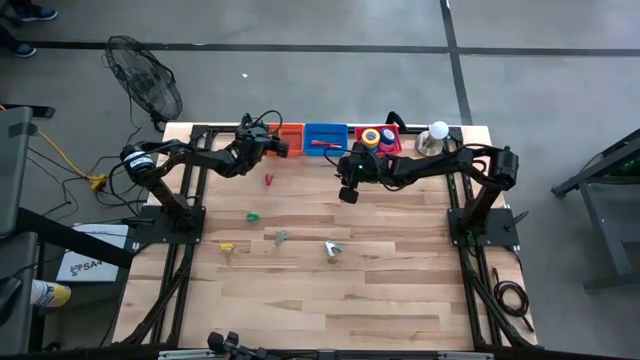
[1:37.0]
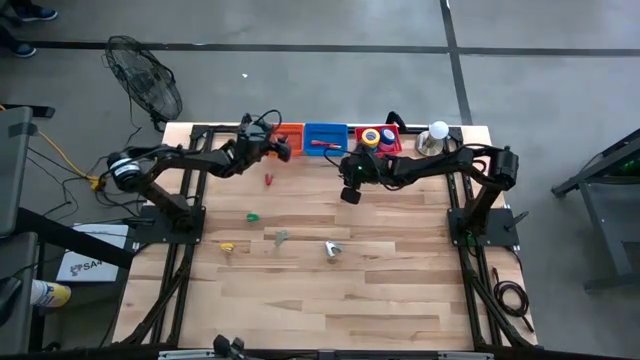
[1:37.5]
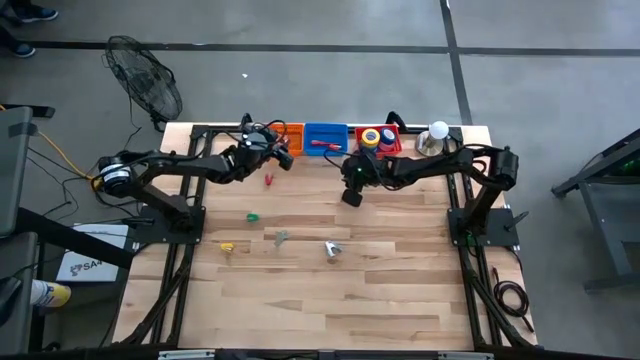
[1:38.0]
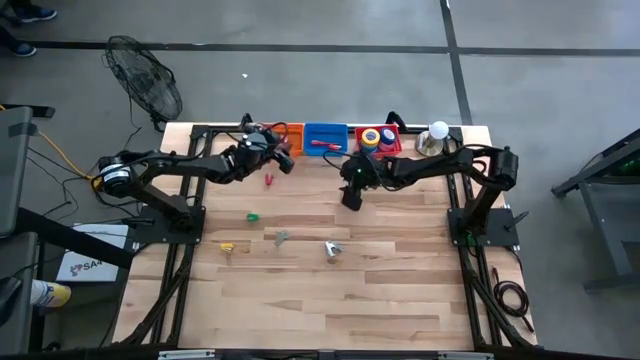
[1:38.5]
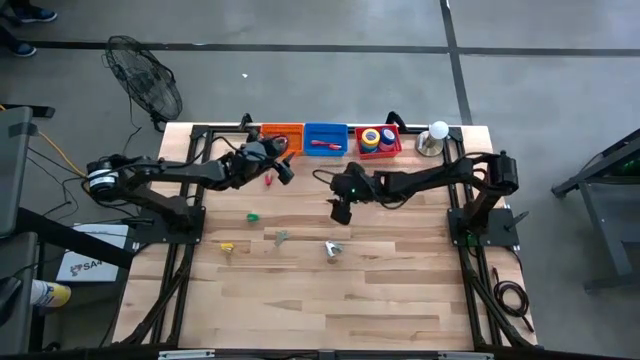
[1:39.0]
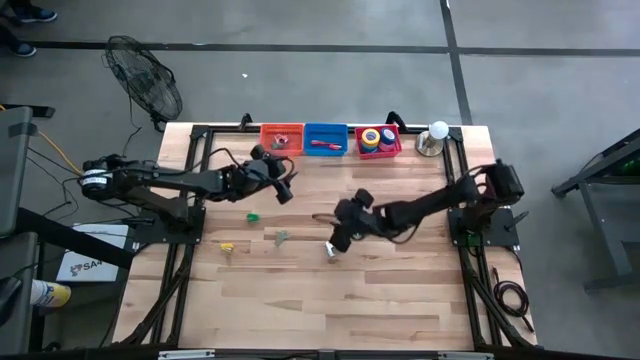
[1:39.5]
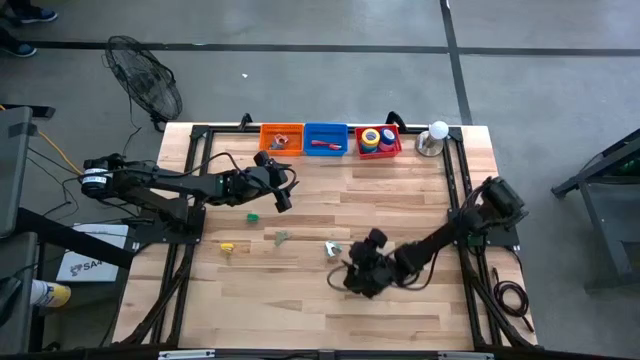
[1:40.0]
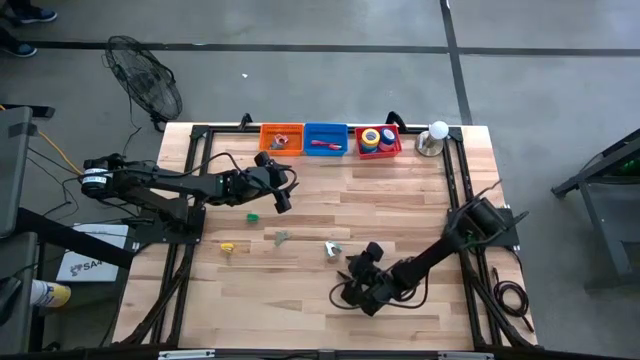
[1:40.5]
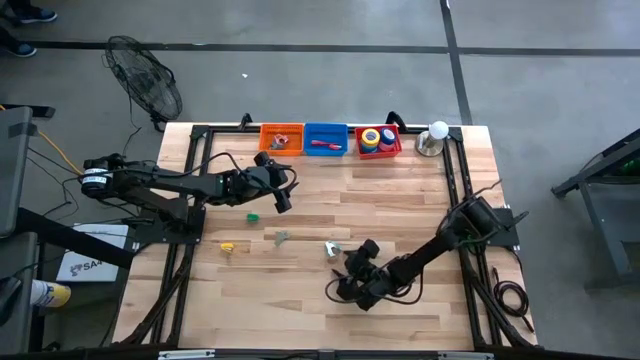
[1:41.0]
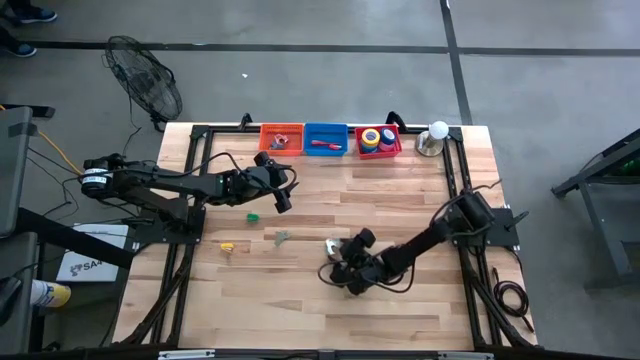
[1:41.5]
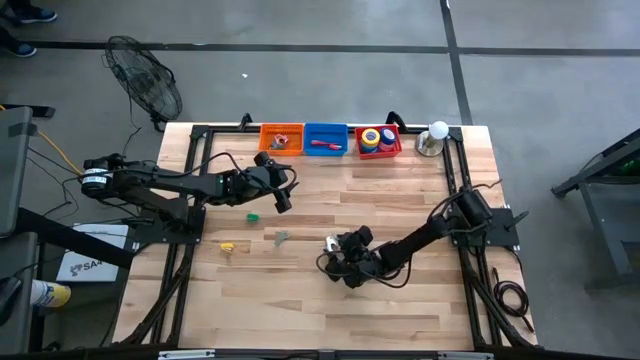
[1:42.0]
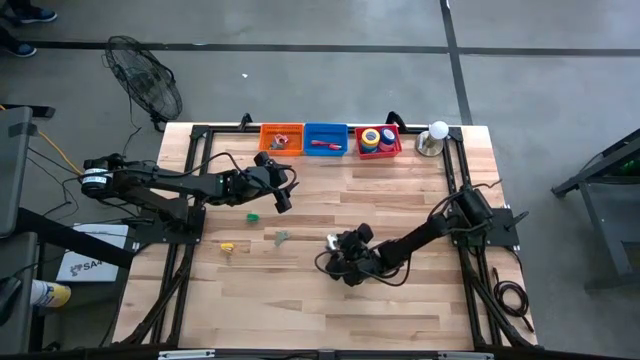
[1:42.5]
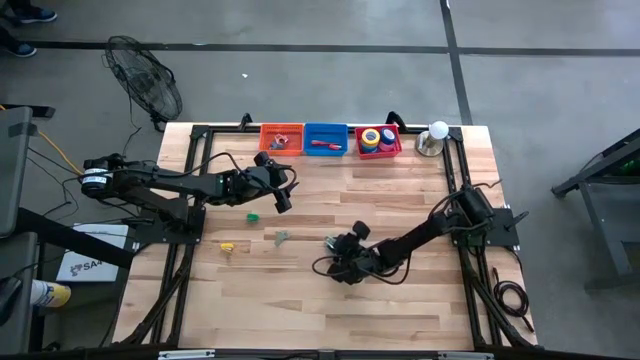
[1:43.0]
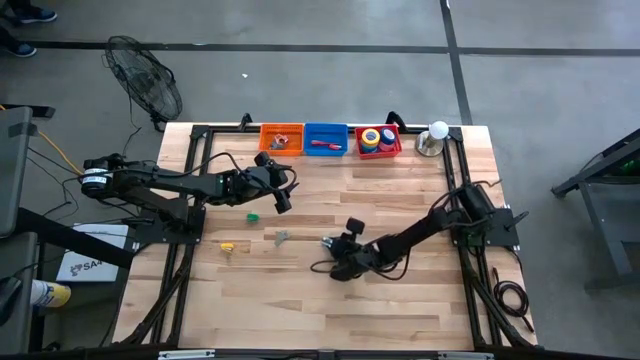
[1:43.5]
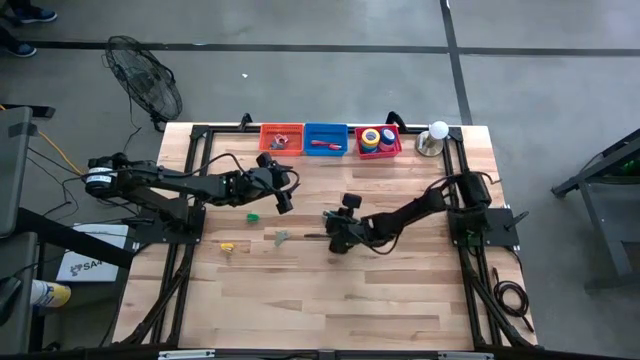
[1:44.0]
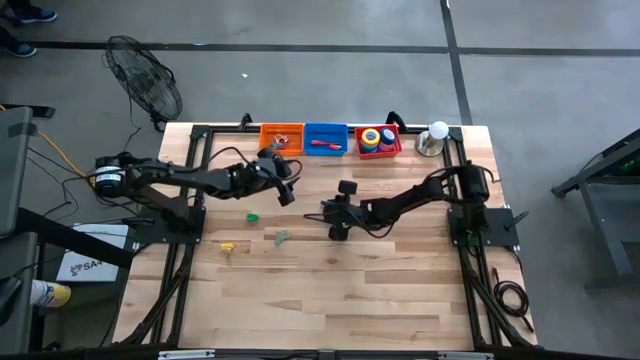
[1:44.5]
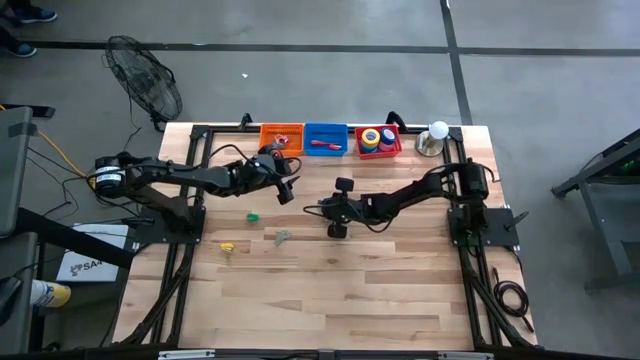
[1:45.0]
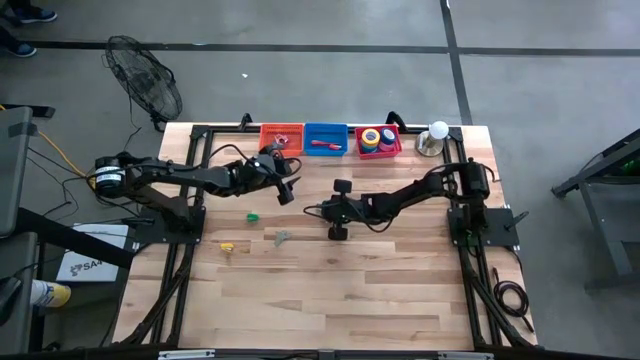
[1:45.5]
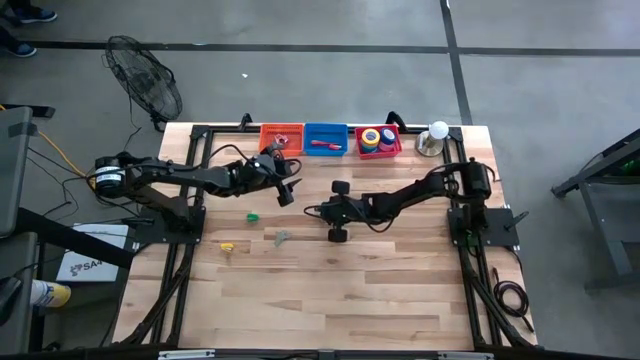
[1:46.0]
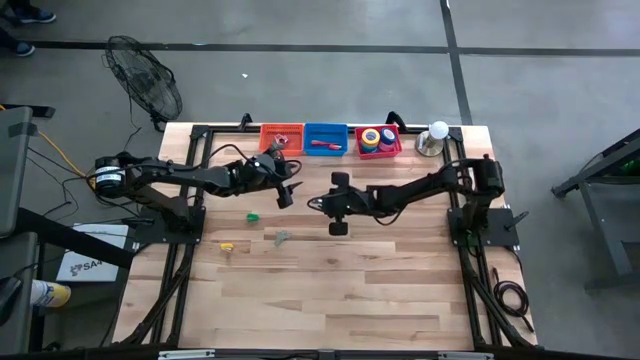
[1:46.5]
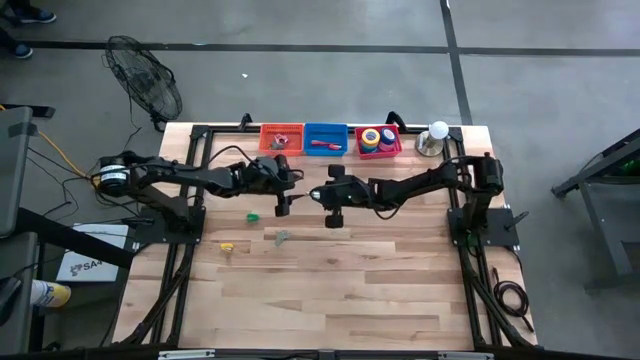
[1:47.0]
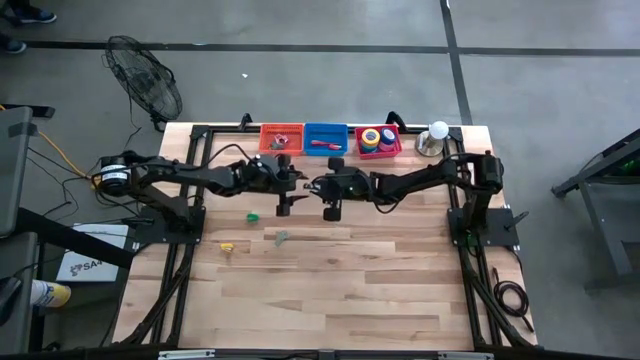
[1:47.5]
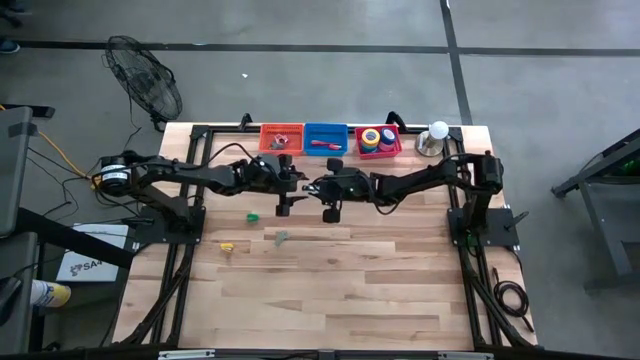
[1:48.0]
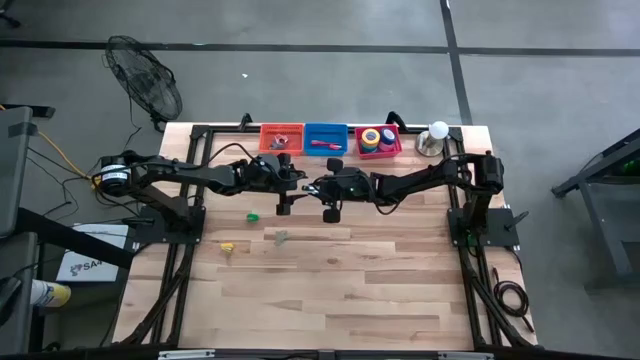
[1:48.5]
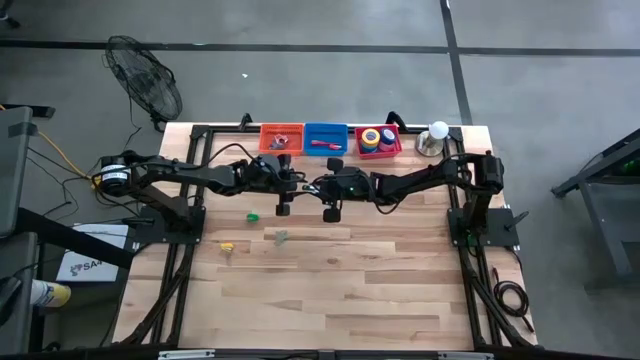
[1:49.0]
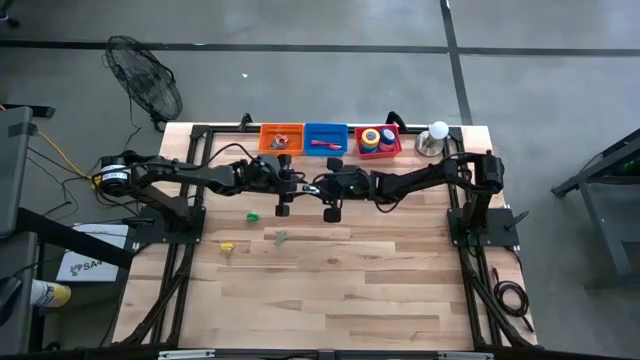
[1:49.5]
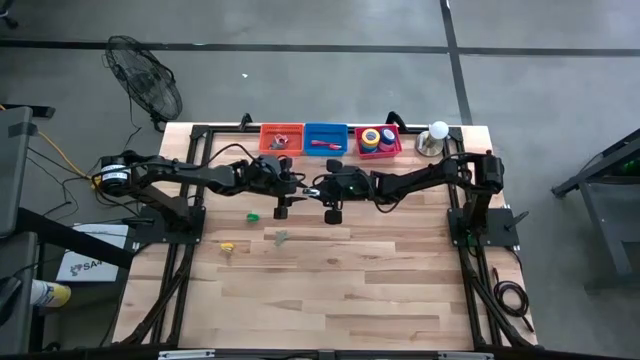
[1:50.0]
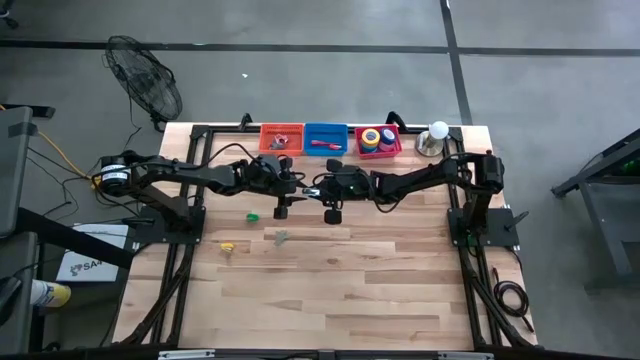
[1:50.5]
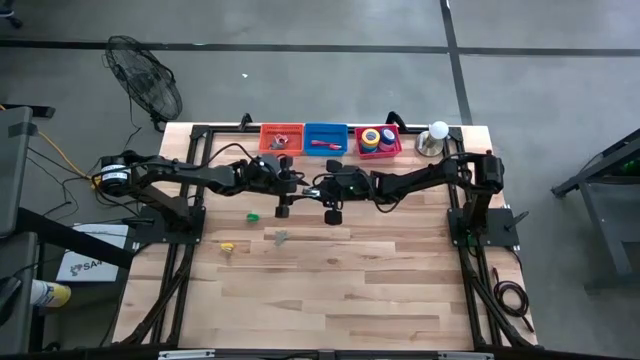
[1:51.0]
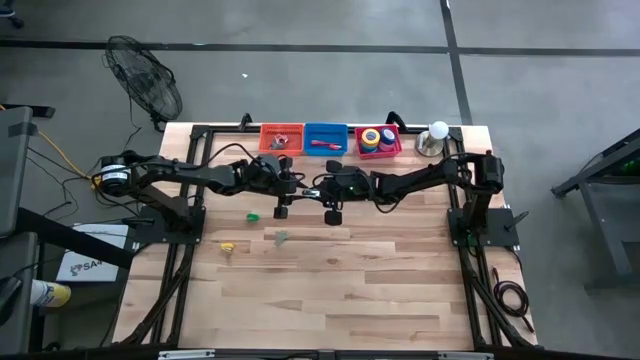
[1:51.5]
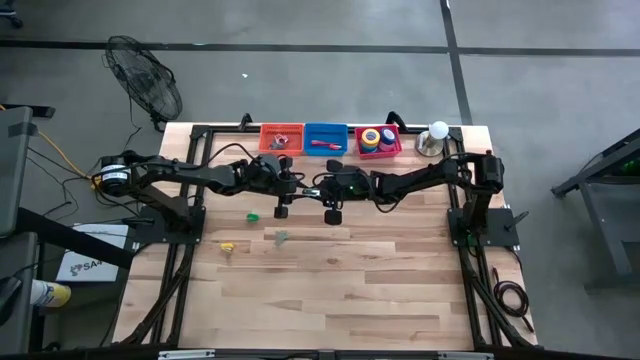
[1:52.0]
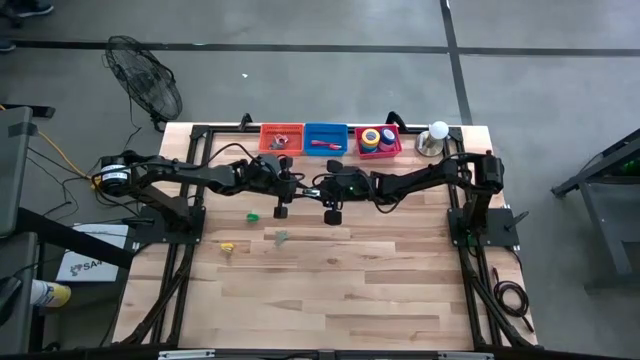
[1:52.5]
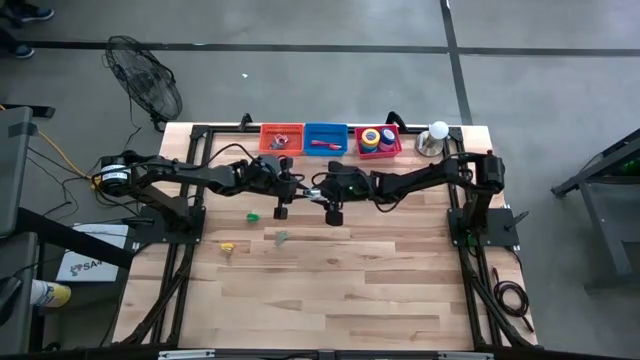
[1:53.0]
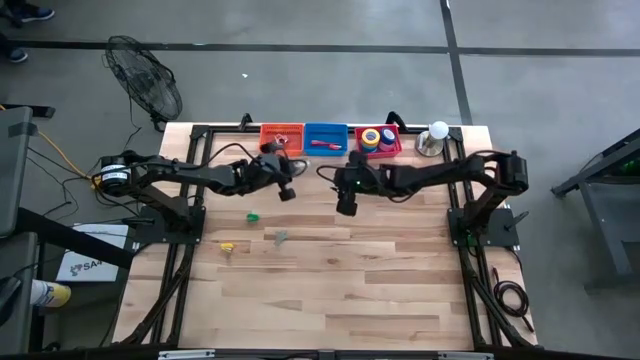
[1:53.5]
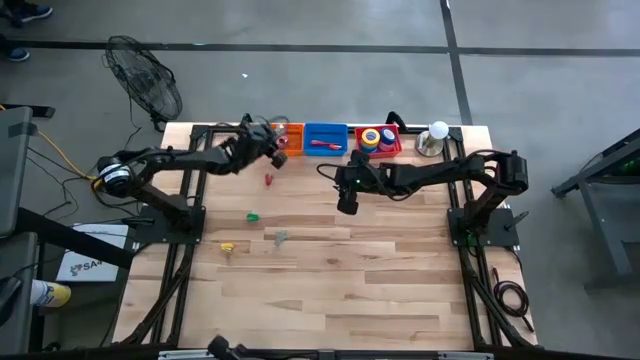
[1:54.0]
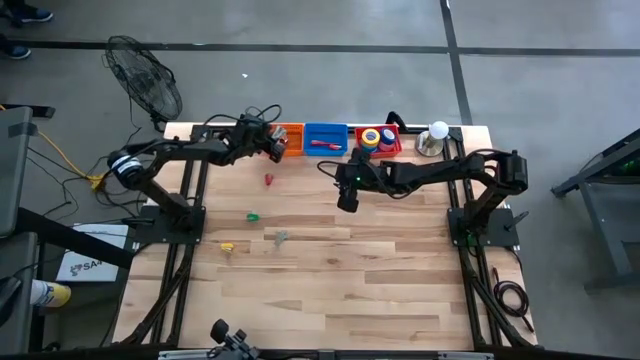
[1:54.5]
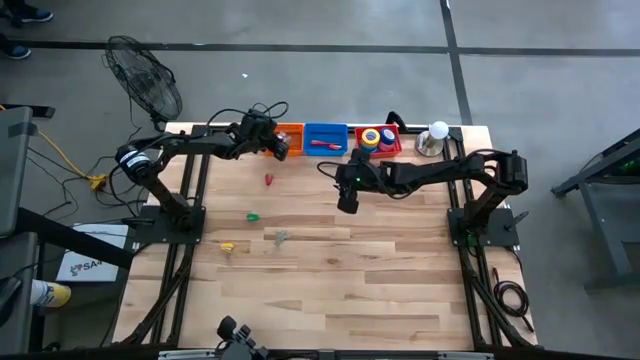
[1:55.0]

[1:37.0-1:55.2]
Task: Pick and place Stapler, Stapler remover, tape
Put the green staple remover into the orange bin
